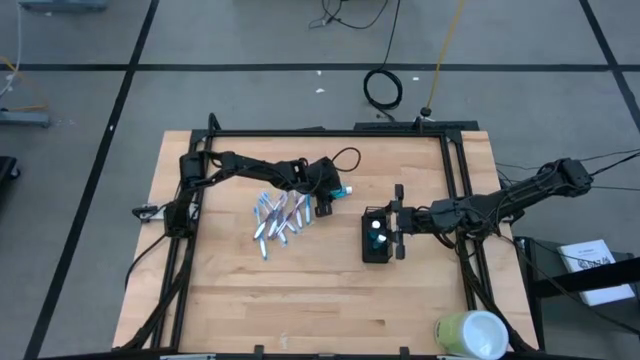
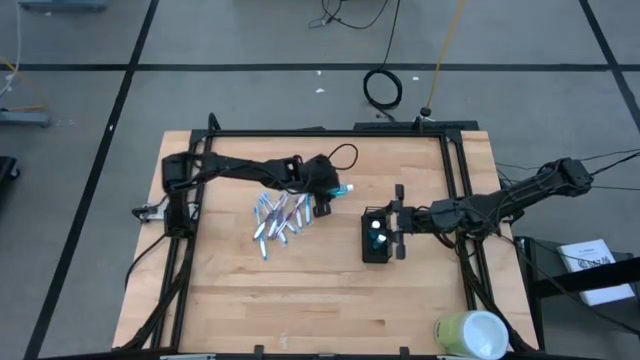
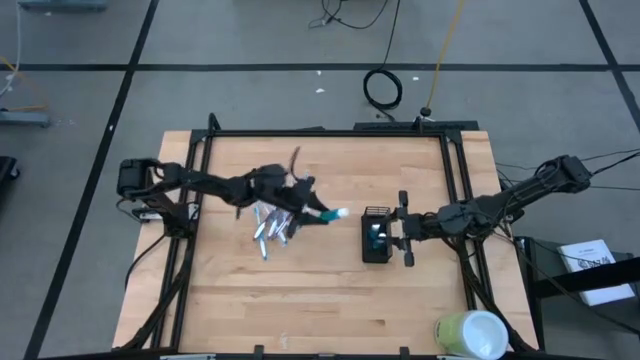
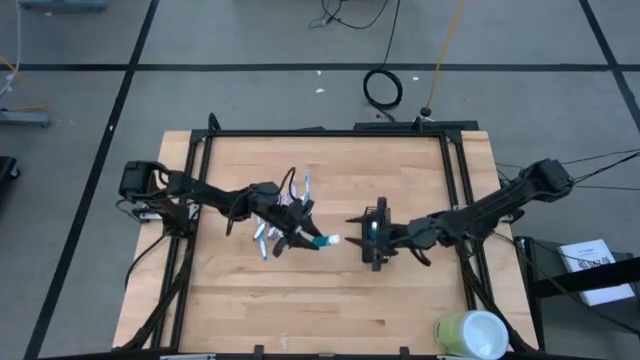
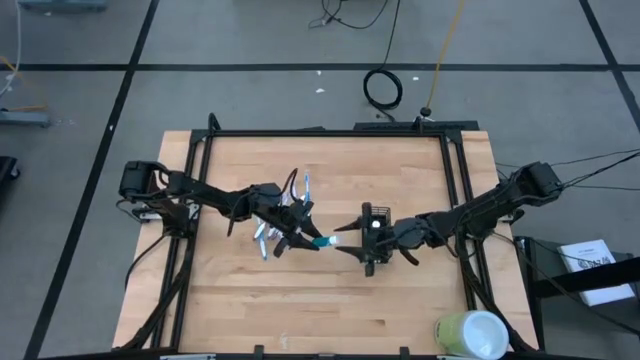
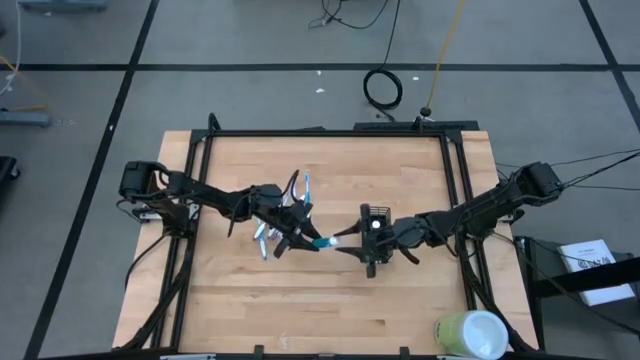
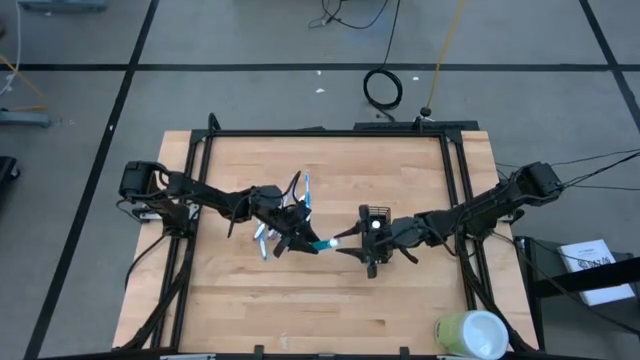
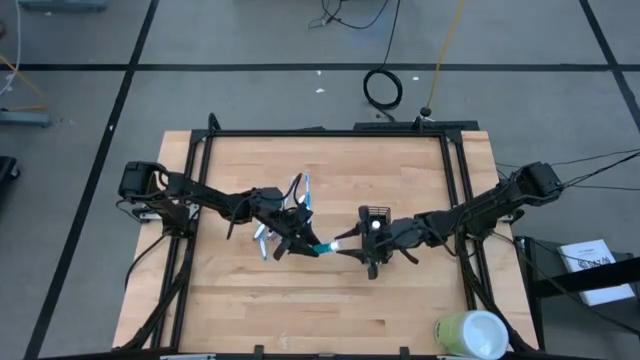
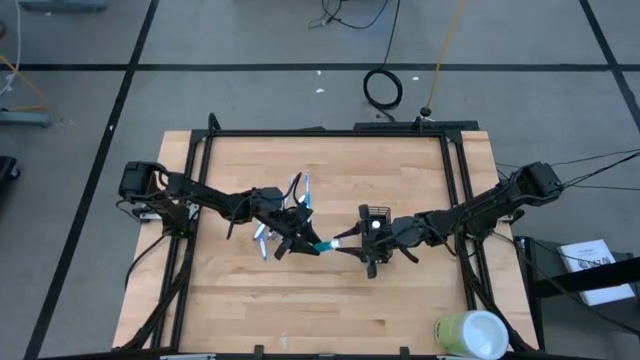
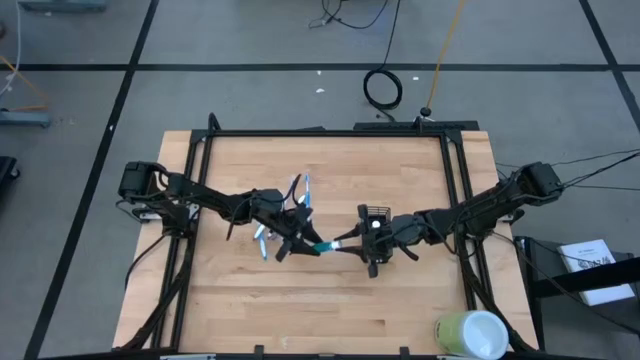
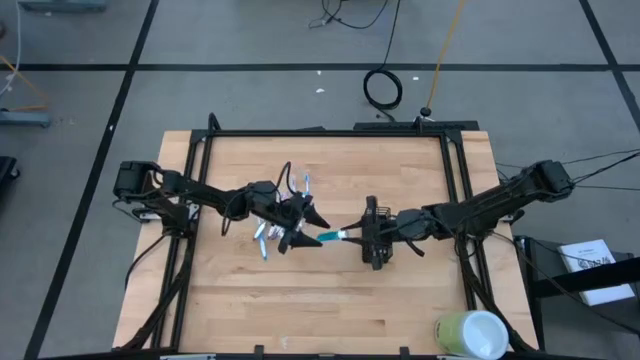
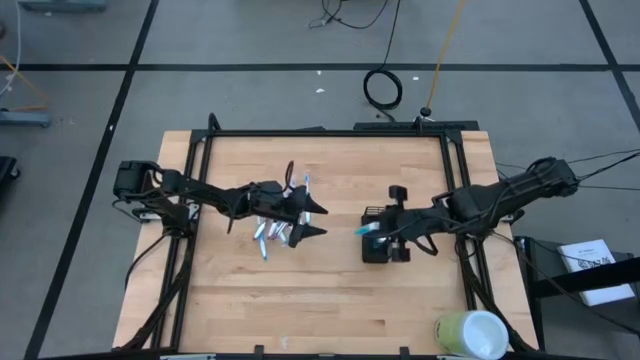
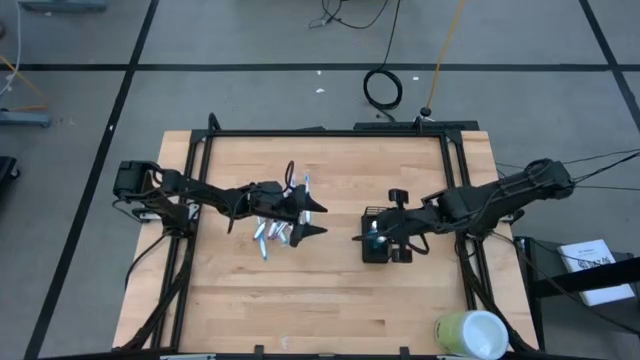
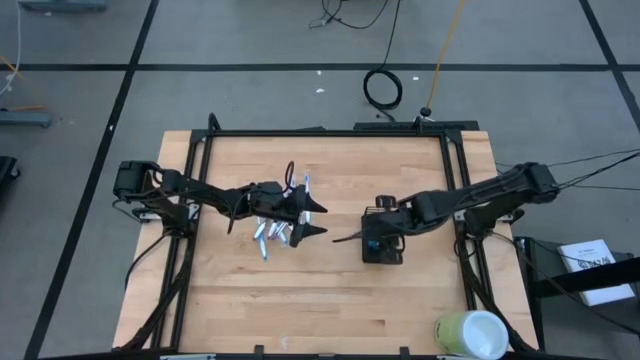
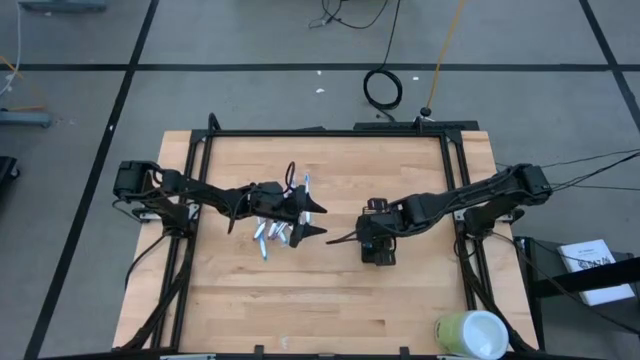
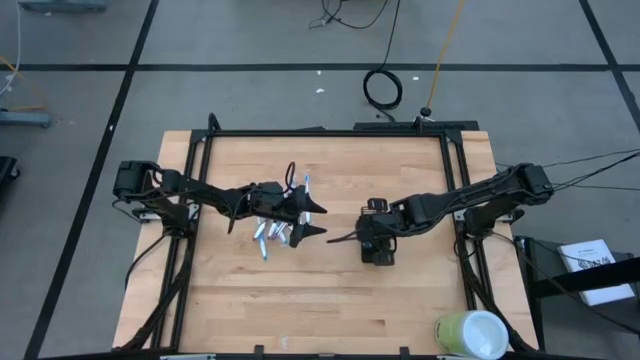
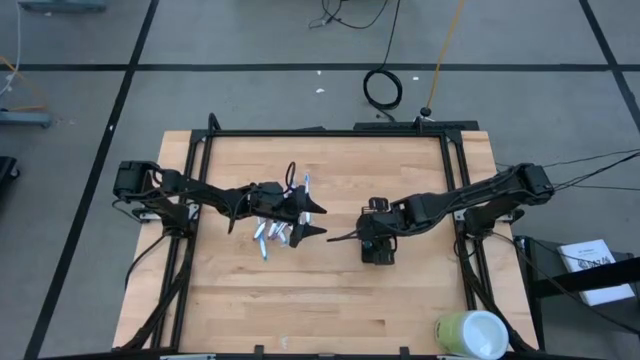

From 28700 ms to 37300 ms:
Task: Pick & Place toothbrushing station
Put the blue mouthwash bottle into the black organizer

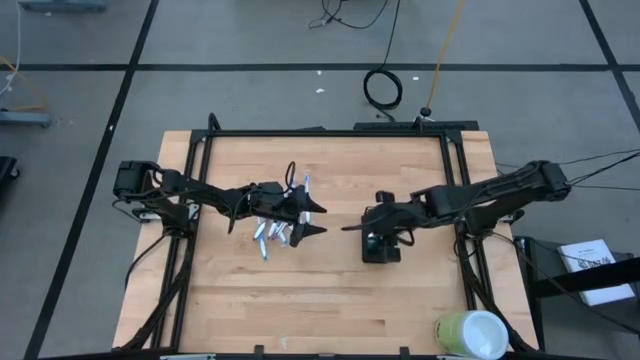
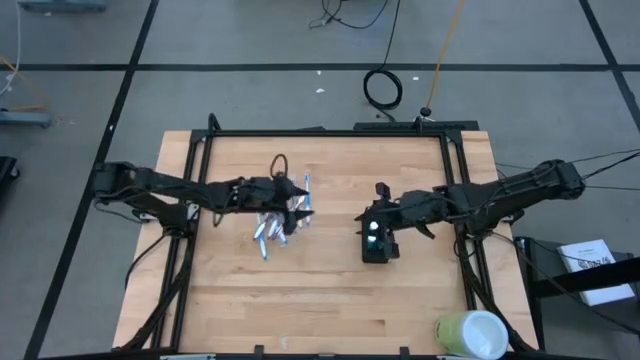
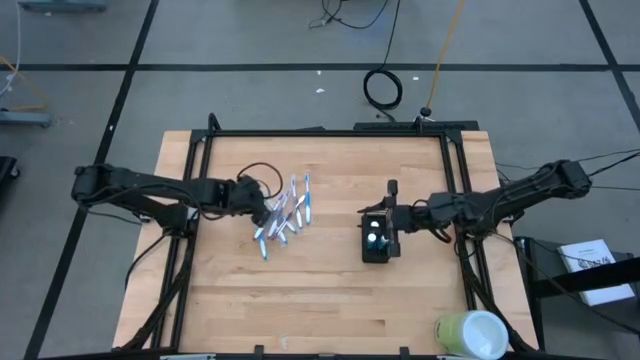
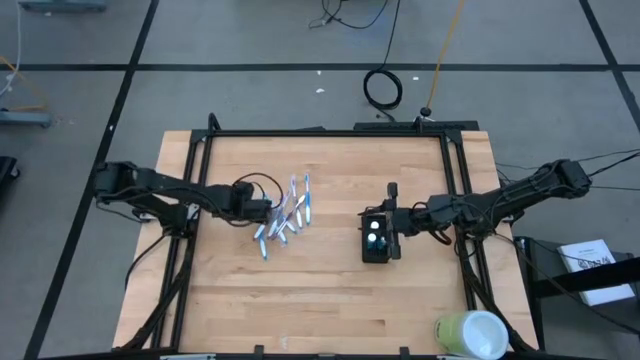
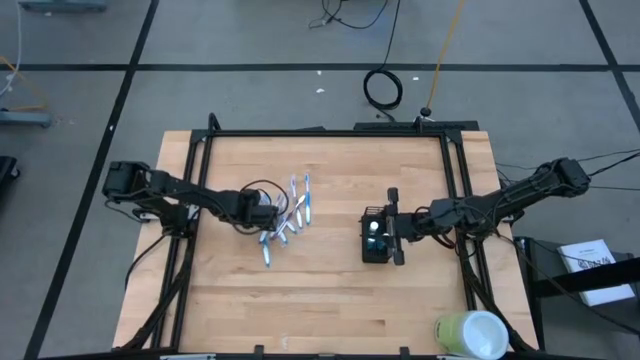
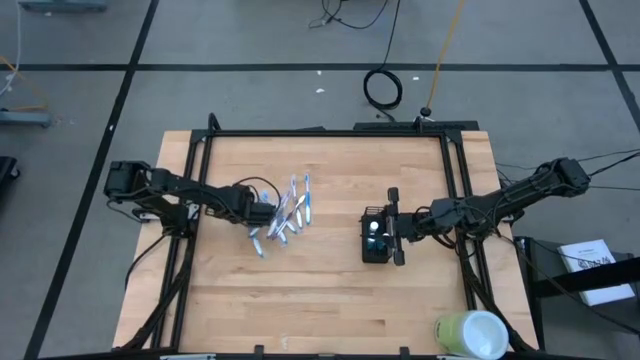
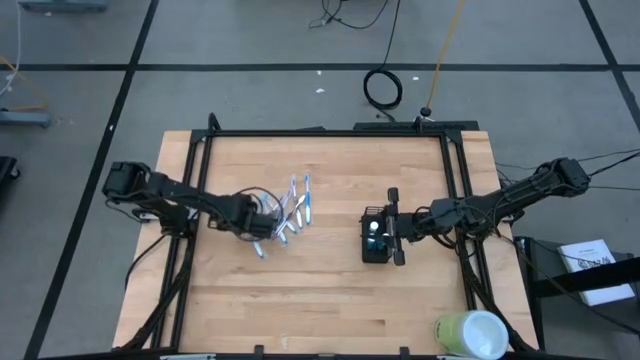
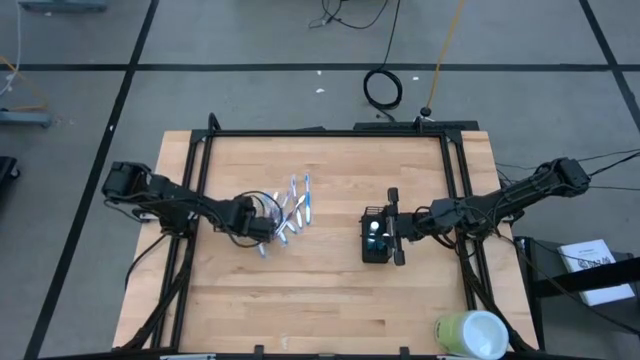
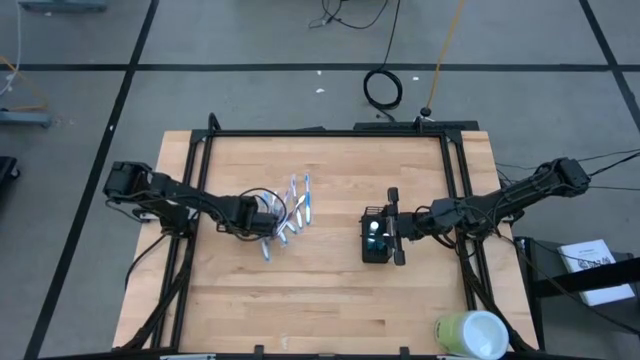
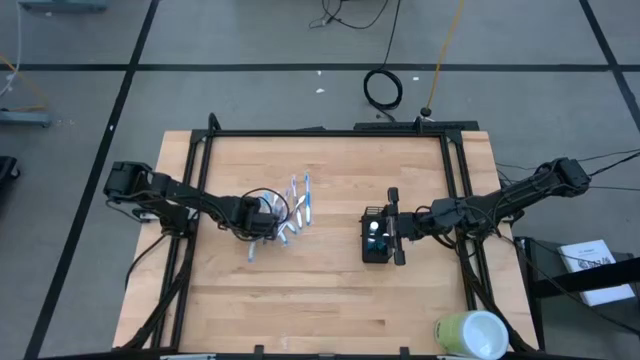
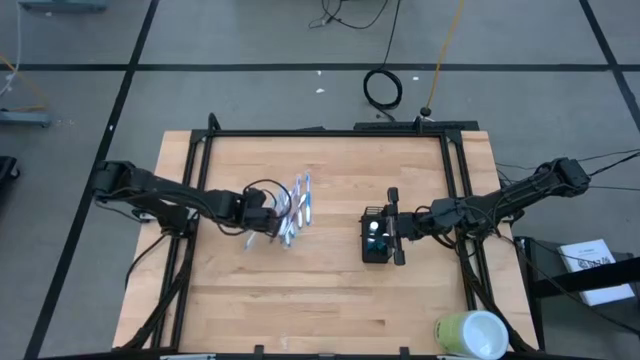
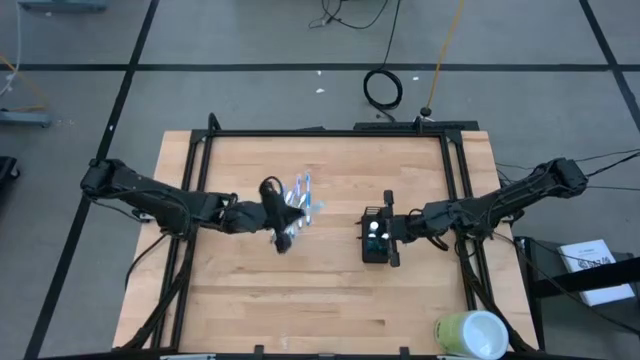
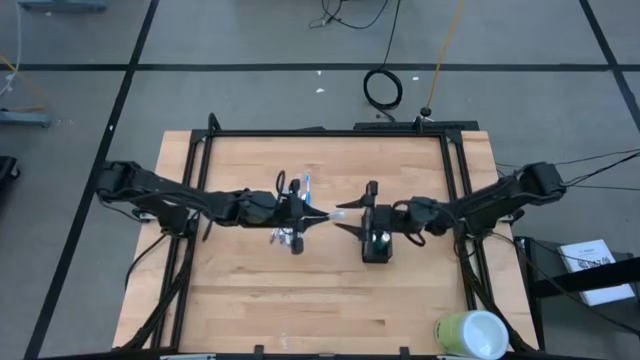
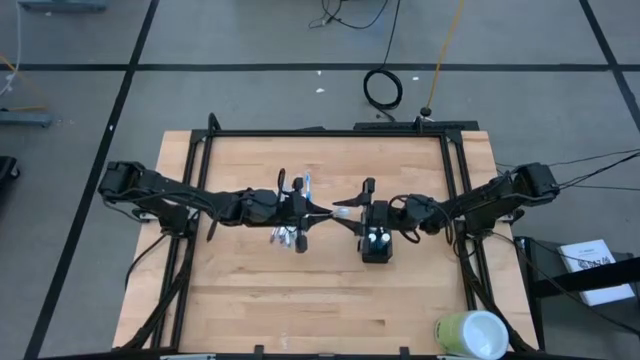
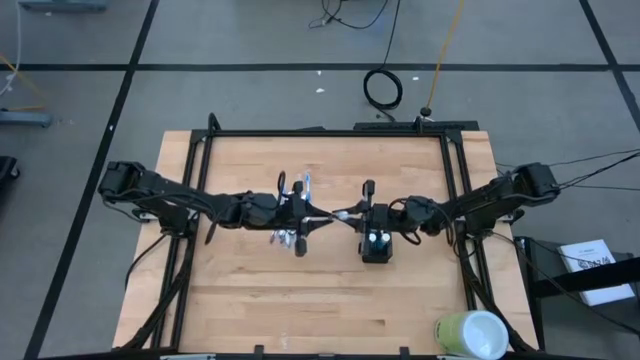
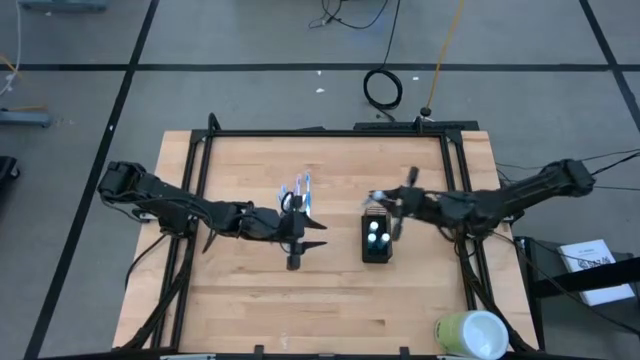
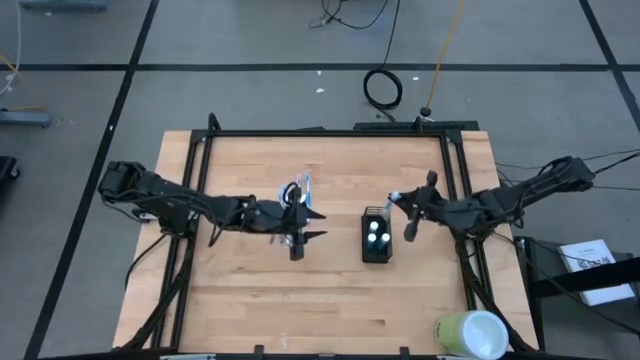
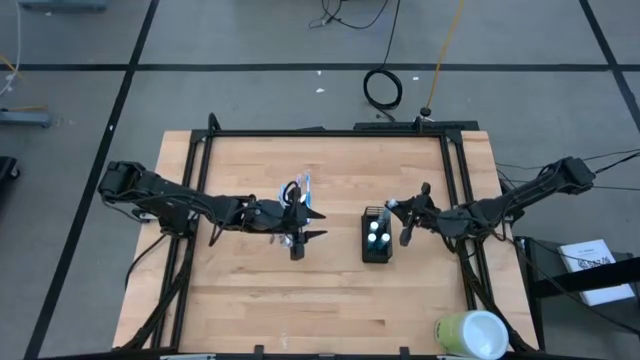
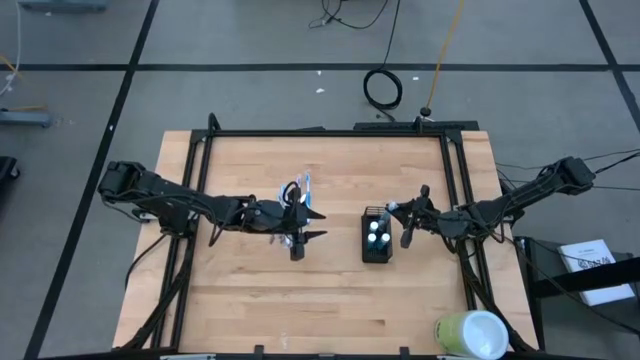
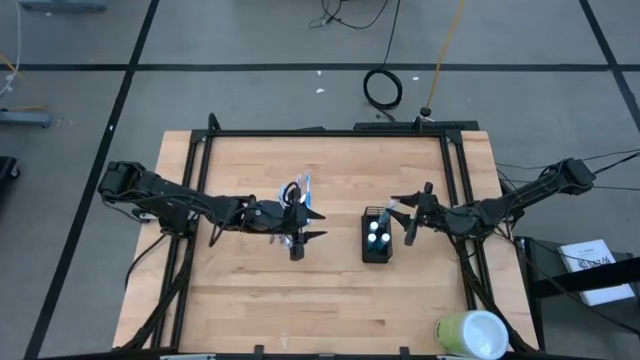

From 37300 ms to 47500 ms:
Put the blue toothbrush into the black organizer

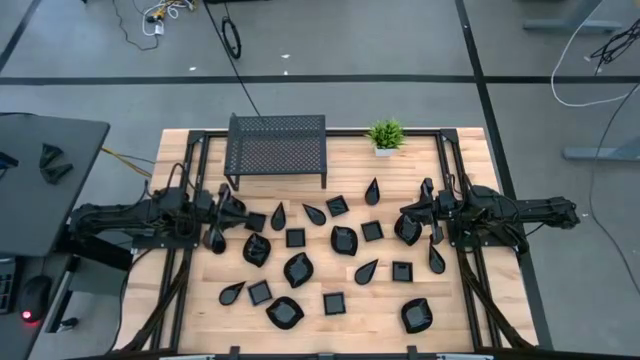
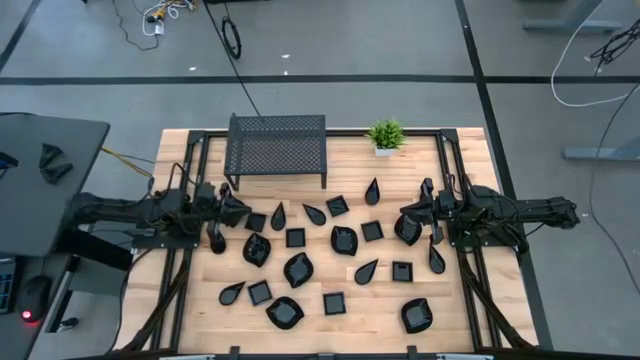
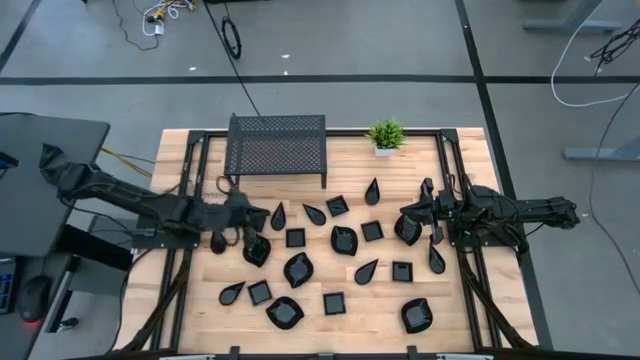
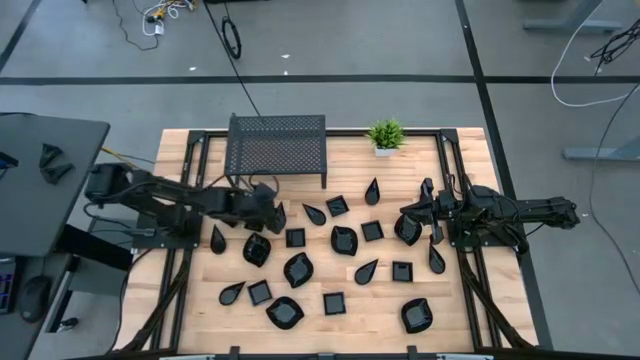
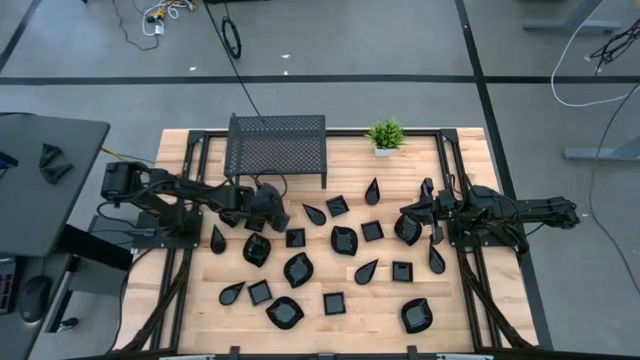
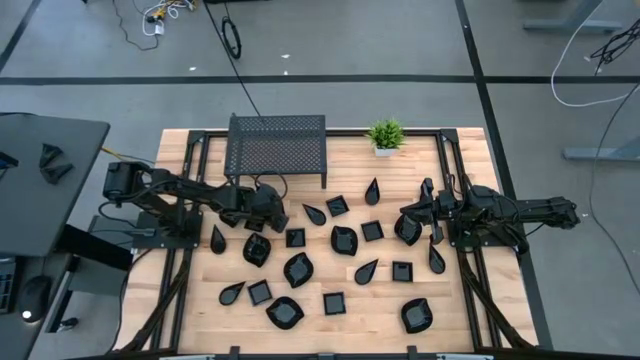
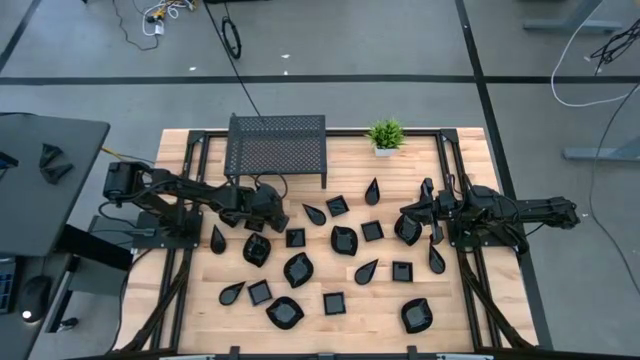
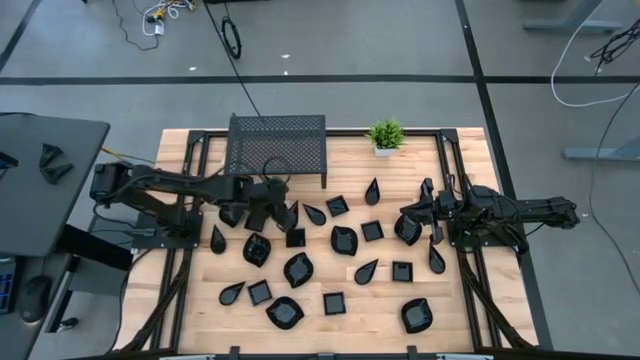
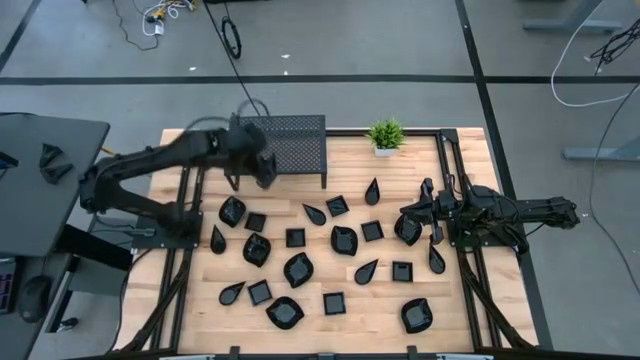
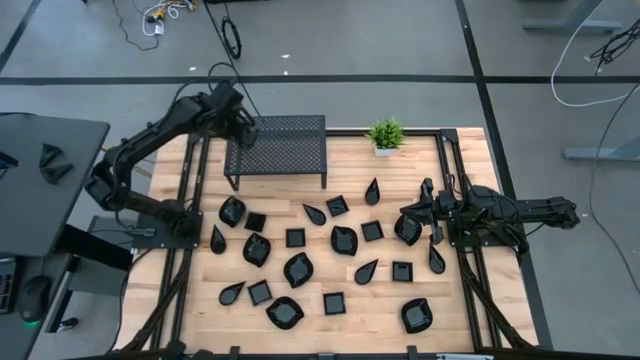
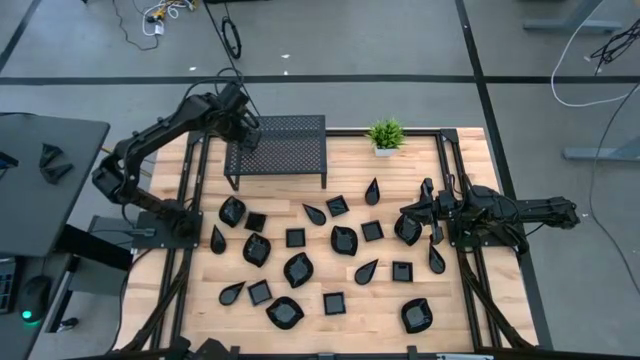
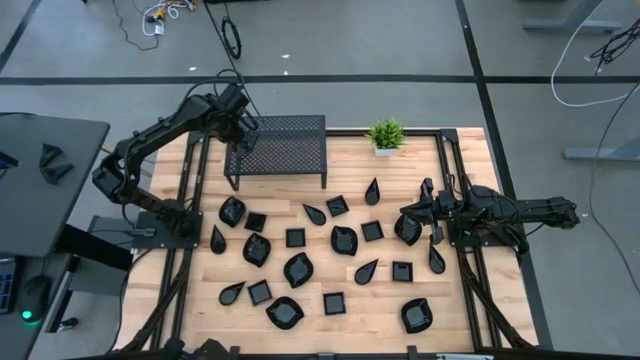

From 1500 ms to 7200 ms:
Task: Pick & Place Mini shaped plates
Put the black drop shaped plate on the shelf
